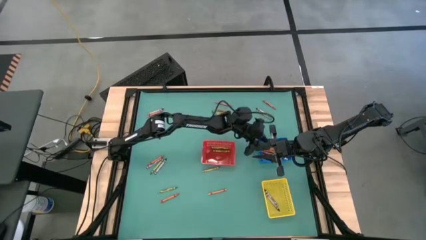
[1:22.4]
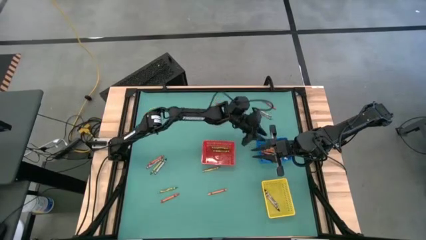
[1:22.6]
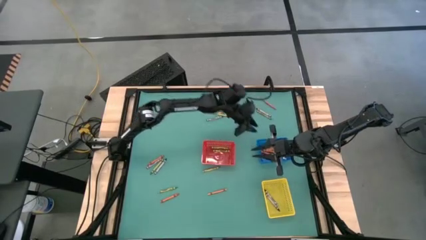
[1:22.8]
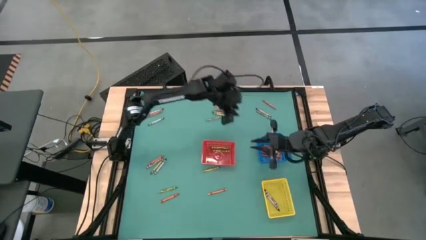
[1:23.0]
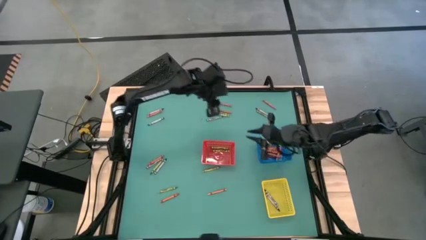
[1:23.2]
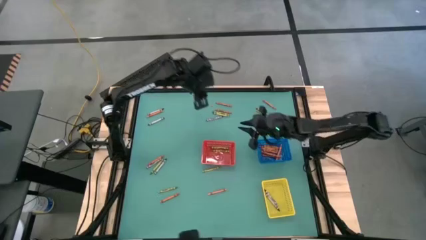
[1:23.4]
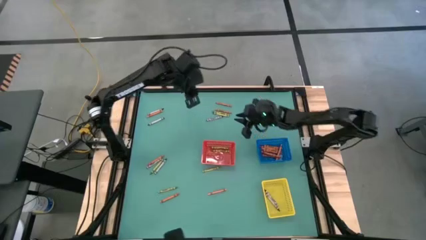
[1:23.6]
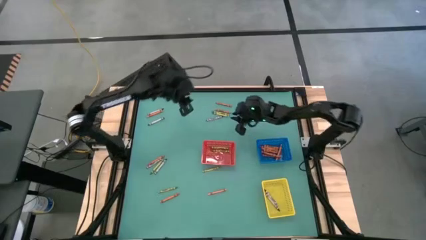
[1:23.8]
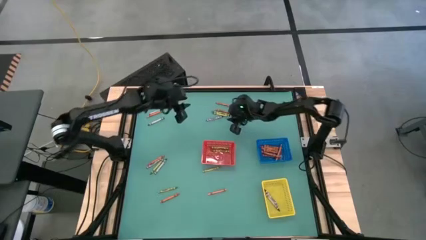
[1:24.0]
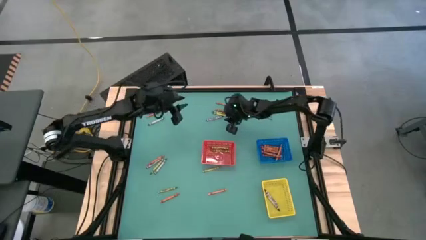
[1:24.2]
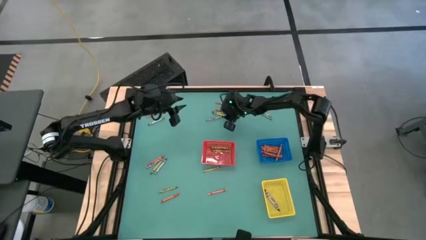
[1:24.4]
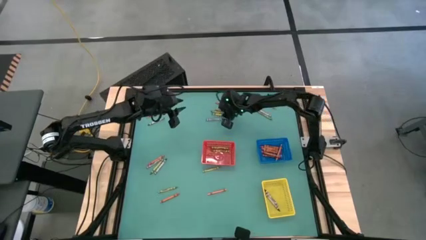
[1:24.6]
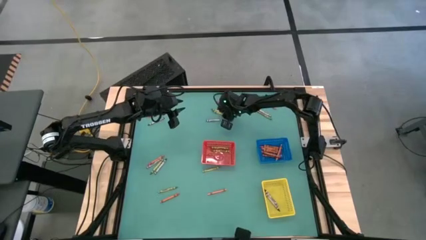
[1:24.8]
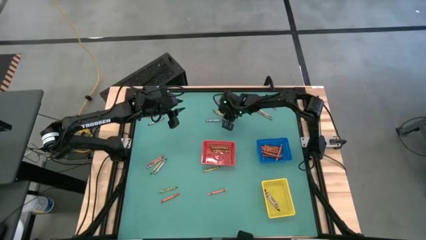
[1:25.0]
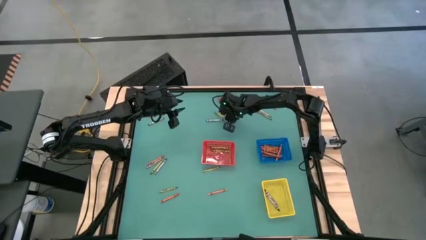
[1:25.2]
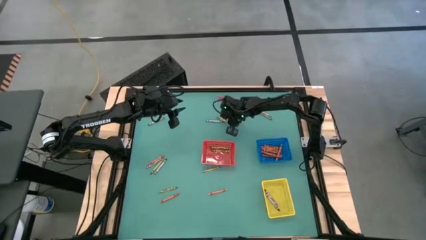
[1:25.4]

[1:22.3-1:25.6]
Task: Sort crayons
Put the green crayon into the red basket

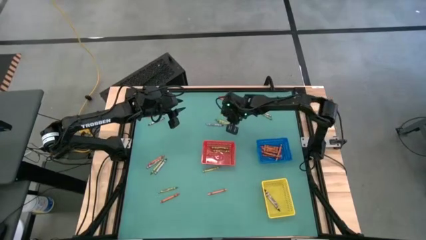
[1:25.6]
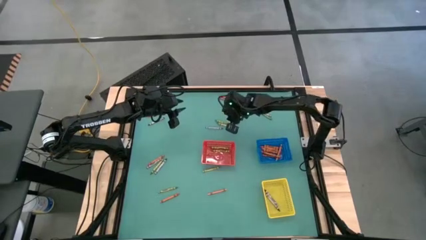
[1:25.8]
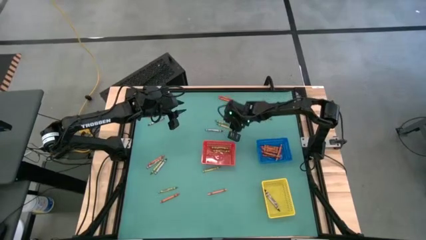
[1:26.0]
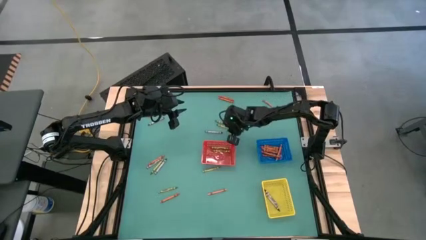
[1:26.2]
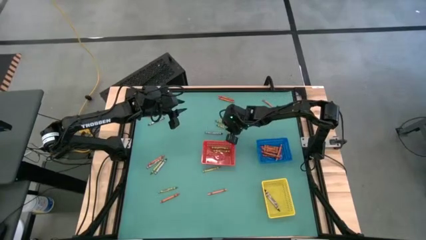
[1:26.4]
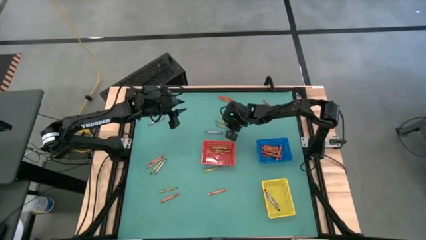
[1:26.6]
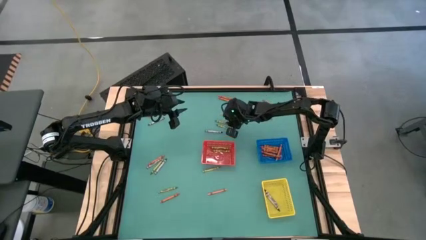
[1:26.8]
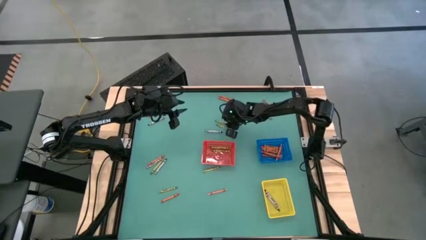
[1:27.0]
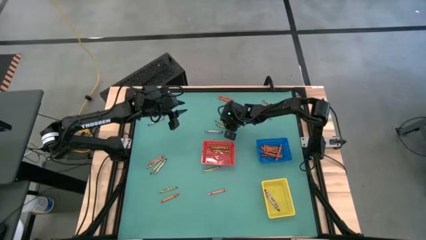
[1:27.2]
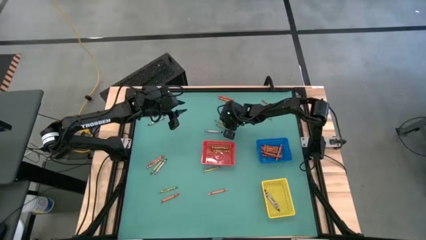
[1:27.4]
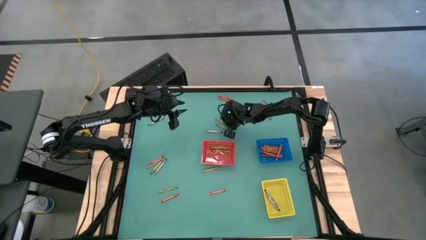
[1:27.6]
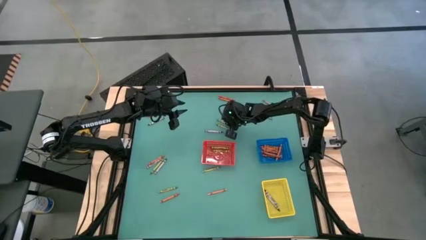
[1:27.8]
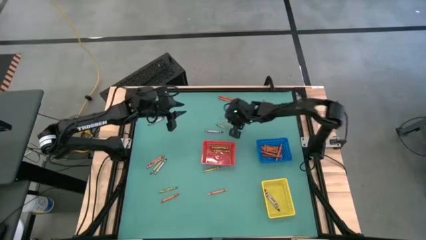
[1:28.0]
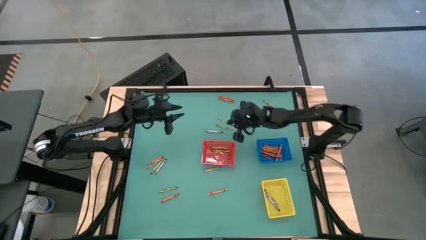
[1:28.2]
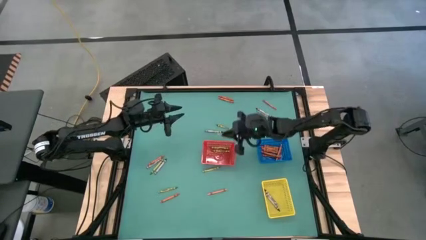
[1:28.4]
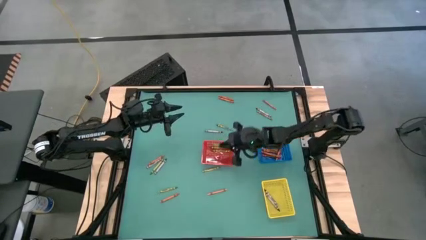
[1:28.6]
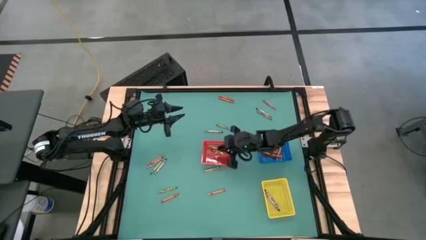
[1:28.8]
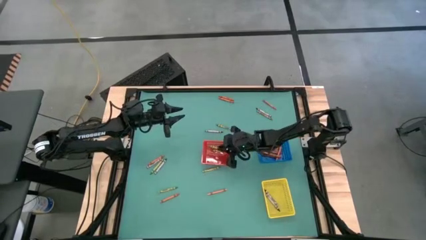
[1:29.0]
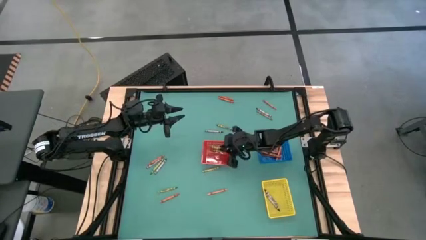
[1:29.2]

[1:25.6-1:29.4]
Put the green crayon into the red basket

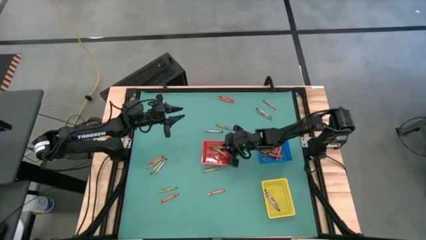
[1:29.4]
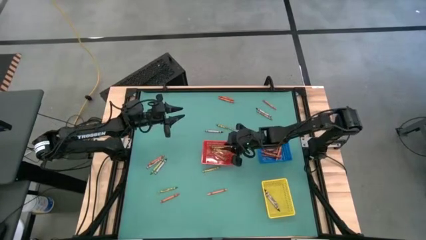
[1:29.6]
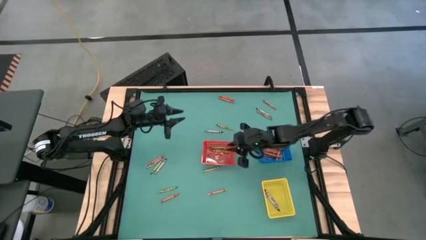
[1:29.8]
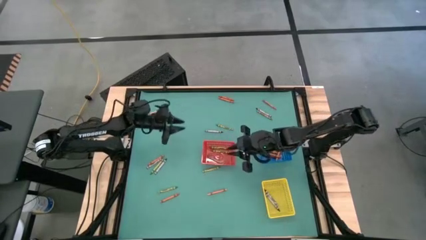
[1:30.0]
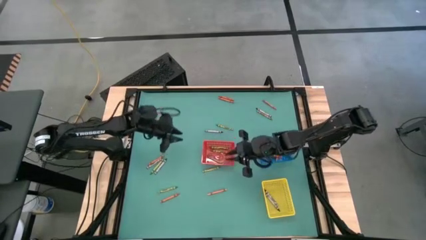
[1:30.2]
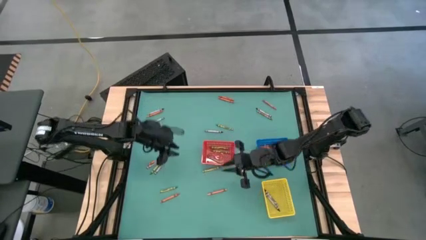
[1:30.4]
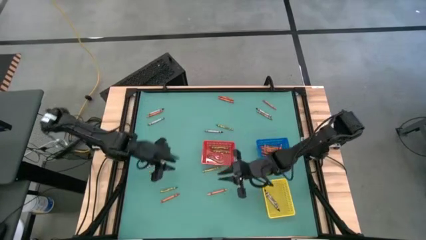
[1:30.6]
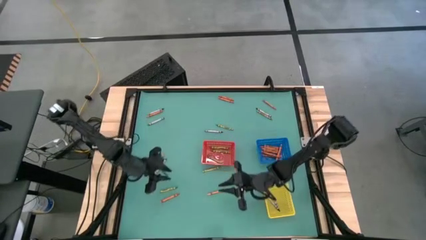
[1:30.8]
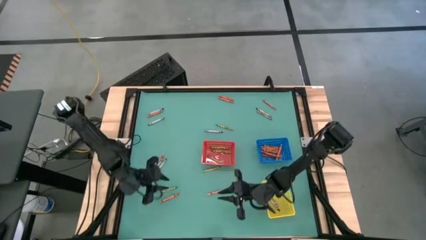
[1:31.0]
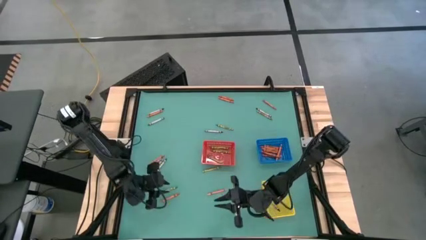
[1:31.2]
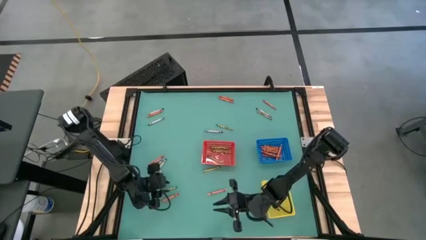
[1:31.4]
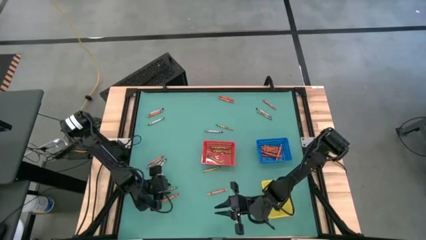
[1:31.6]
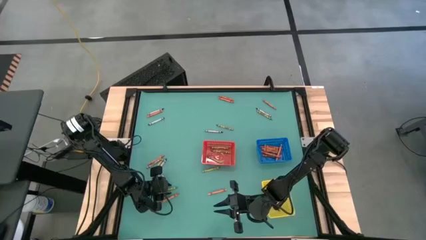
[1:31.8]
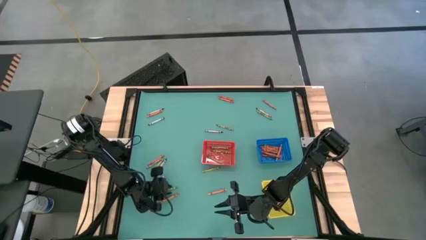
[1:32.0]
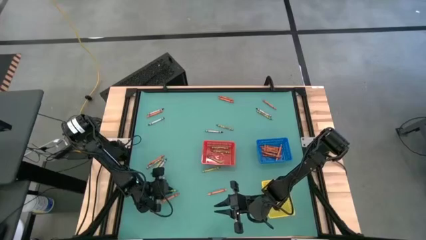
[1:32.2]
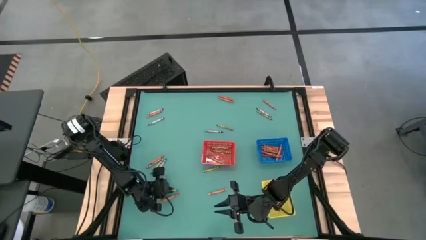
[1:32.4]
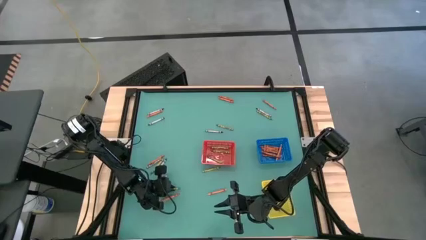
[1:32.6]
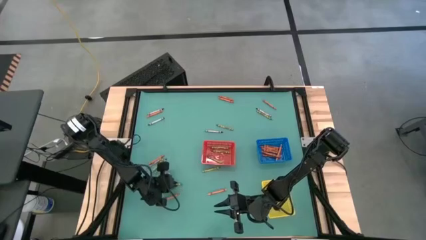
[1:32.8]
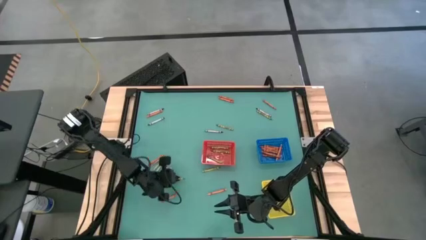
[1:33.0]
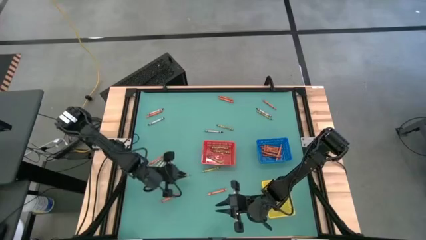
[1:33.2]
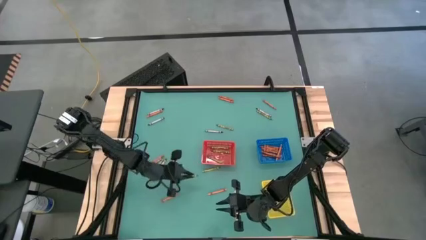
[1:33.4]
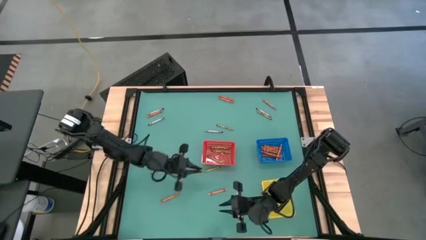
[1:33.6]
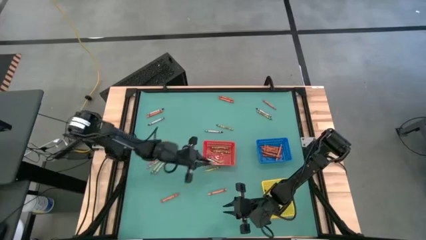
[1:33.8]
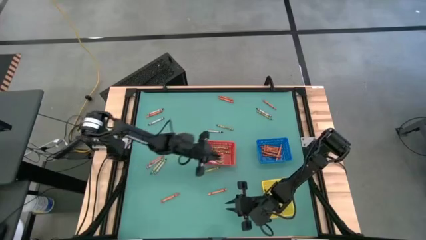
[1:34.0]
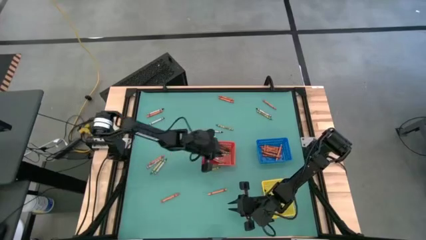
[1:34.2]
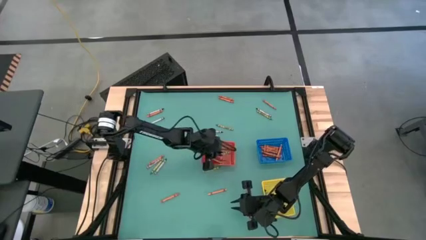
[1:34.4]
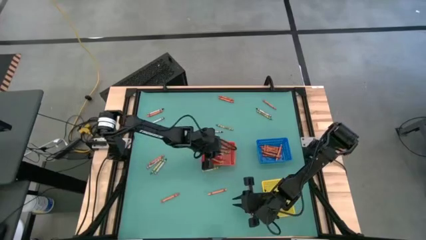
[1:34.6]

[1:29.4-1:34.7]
Put the green crayon into the red basket

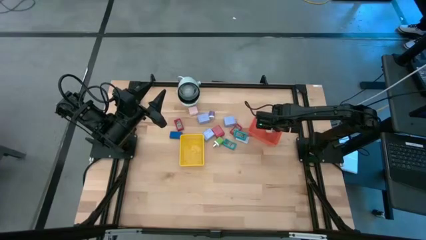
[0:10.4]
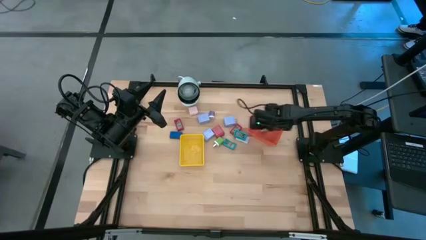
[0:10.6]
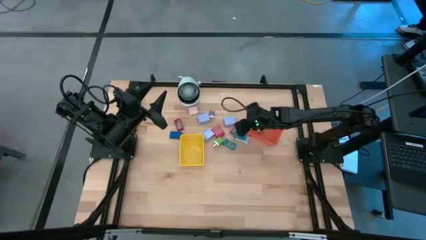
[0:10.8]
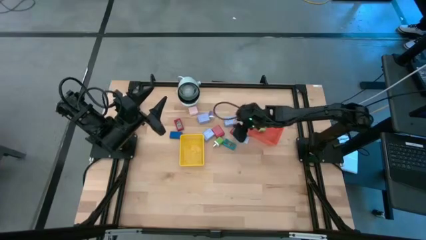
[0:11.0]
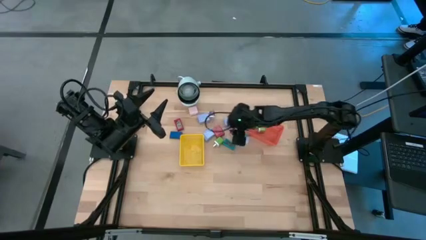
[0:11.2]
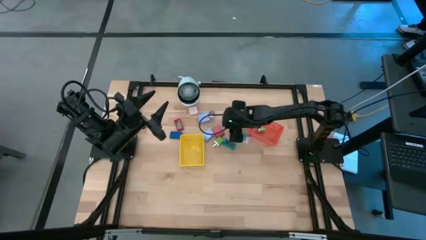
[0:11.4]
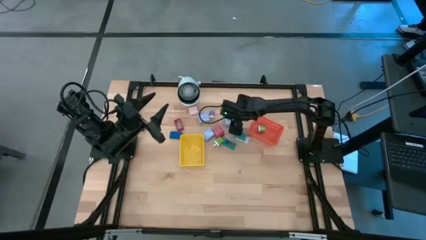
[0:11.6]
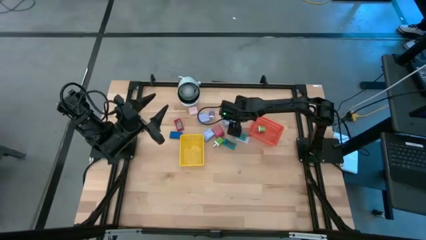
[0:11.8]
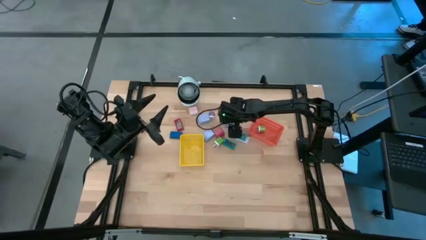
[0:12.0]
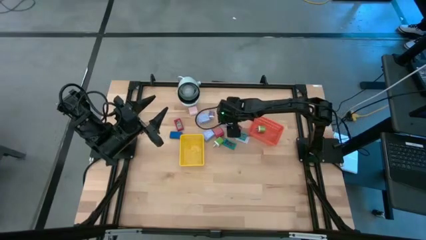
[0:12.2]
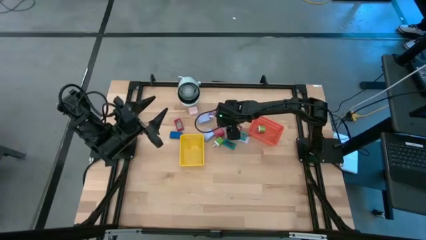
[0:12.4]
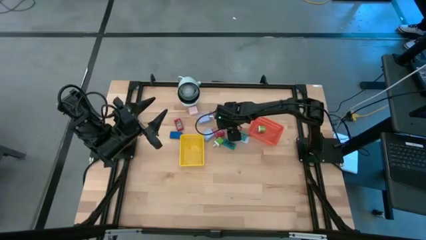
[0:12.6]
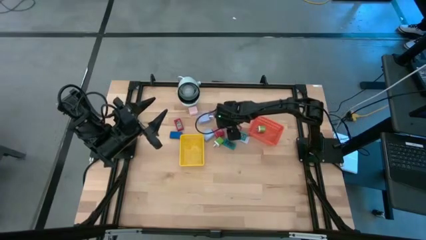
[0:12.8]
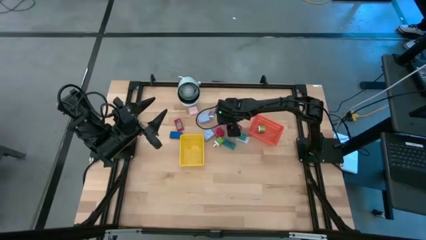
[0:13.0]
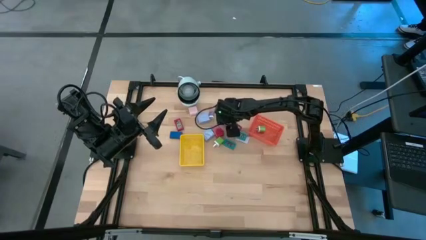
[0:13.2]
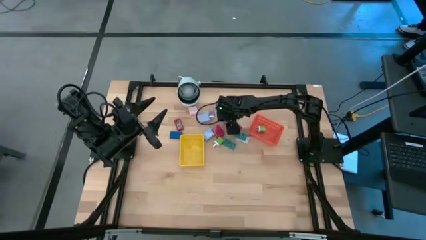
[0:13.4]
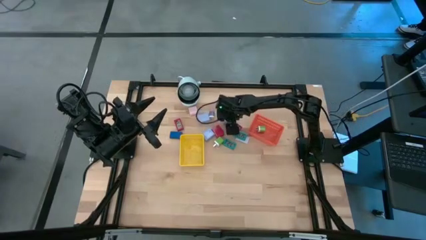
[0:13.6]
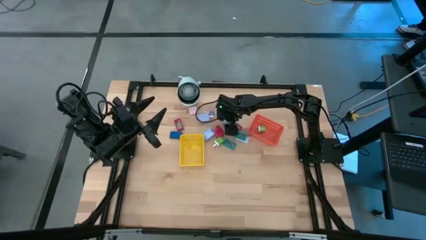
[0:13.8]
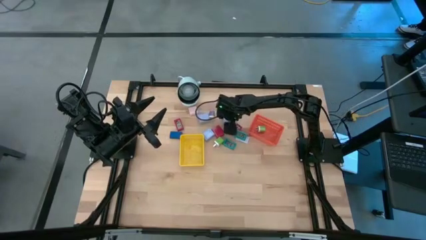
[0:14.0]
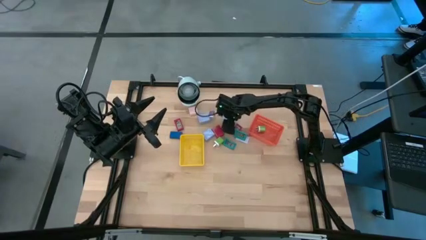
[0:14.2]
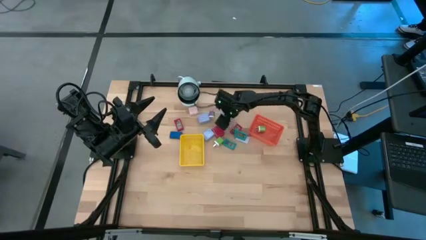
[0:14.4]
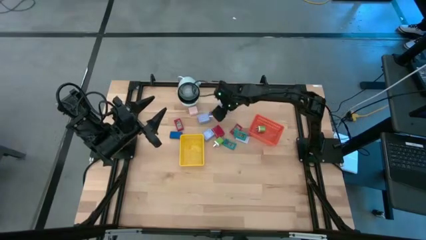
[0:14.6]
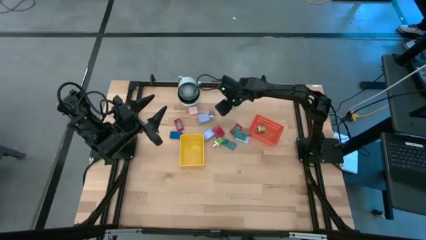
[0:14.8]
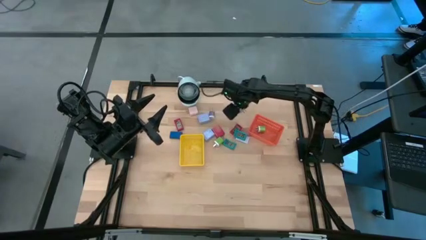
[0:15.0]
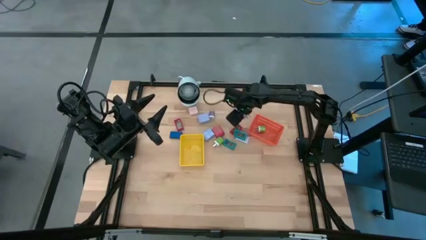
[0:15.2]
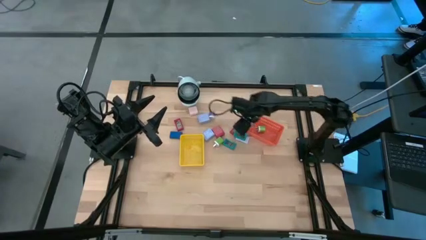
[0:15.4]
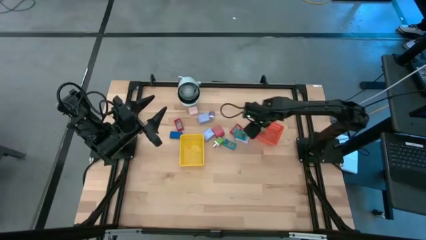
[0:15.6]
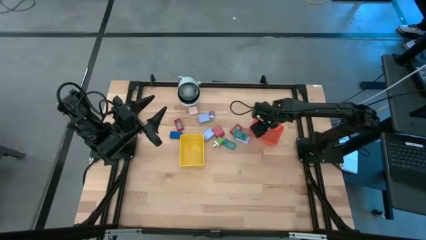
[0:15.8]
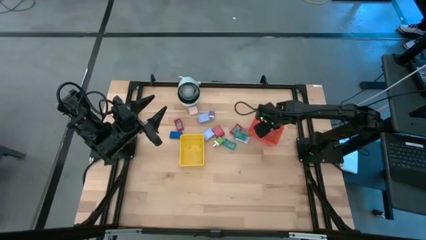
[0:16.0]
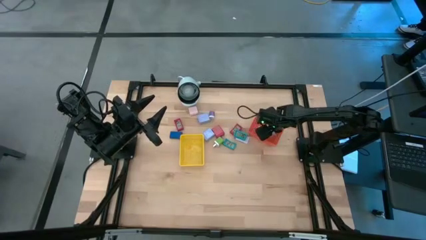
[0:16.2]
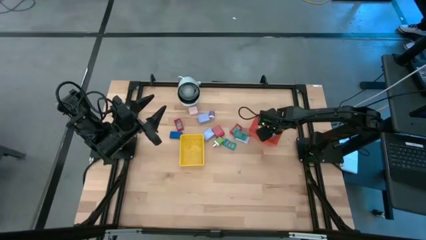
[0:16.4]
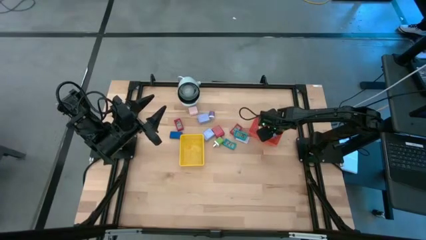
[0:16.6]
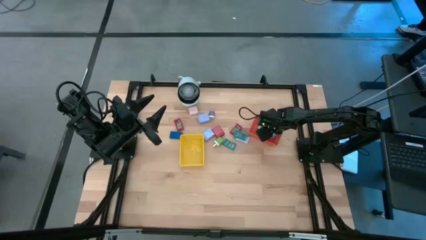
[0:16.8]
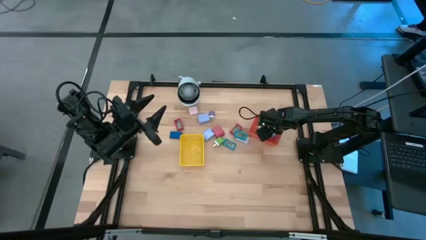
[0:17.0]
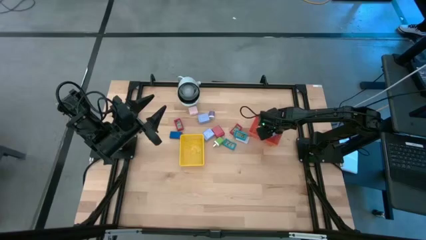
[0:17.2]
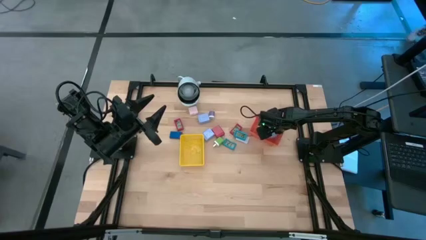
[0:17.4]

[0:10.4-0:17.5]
Task: Pick & Place Office items
Put the top right blue charger adapter into the orange basket
